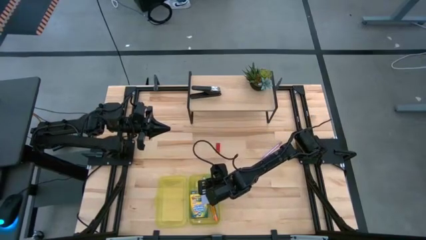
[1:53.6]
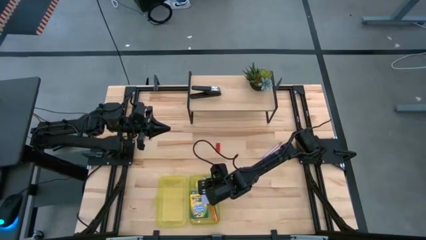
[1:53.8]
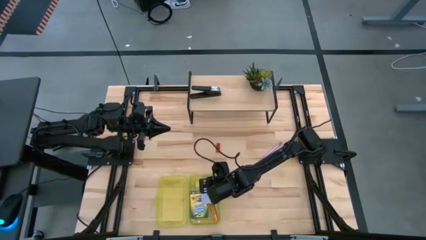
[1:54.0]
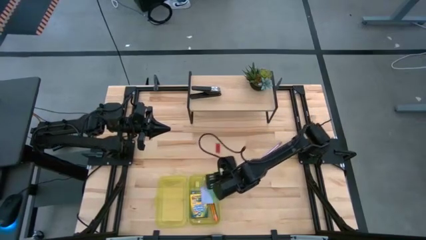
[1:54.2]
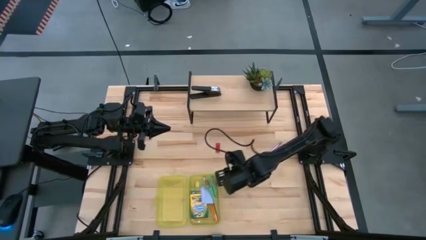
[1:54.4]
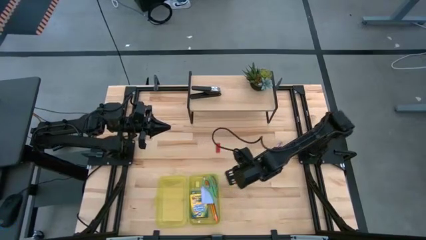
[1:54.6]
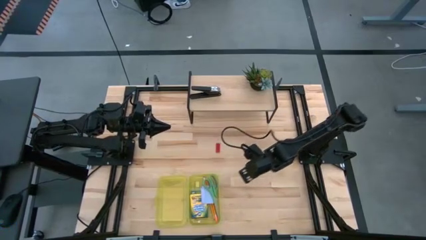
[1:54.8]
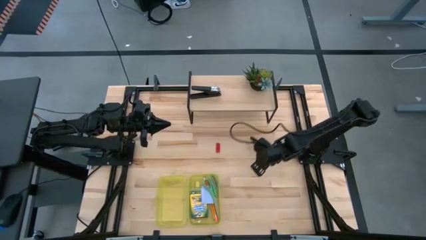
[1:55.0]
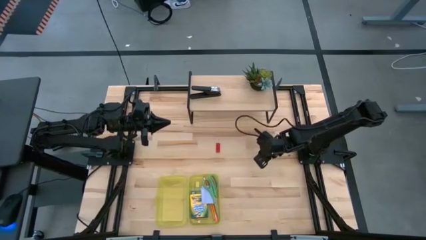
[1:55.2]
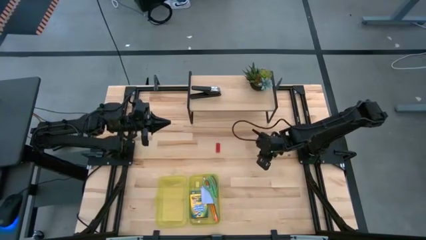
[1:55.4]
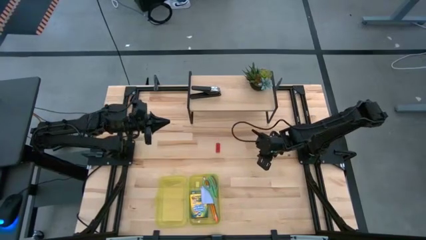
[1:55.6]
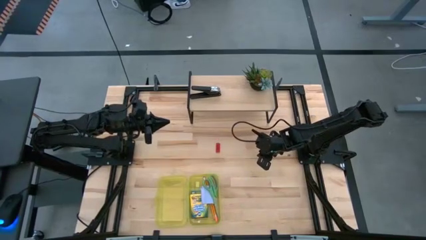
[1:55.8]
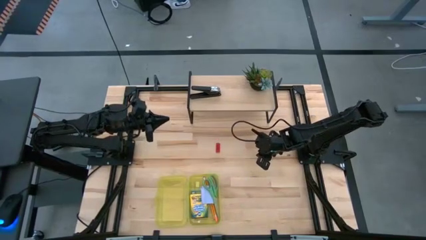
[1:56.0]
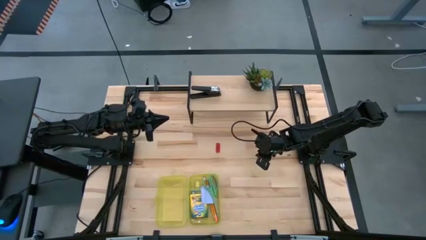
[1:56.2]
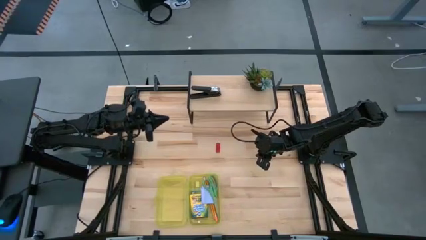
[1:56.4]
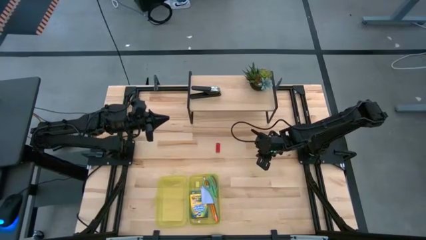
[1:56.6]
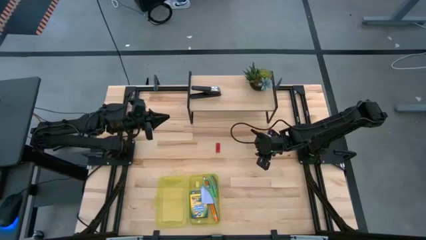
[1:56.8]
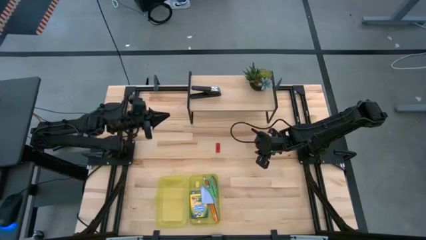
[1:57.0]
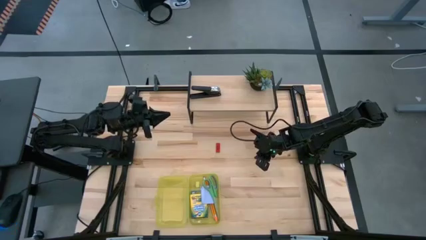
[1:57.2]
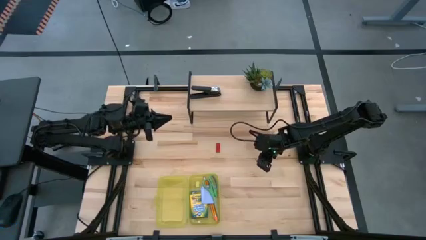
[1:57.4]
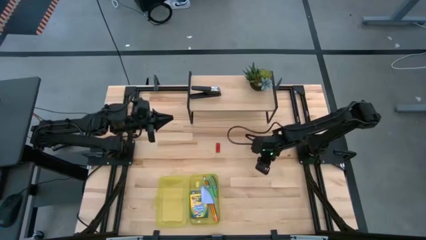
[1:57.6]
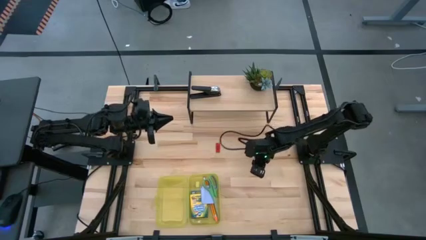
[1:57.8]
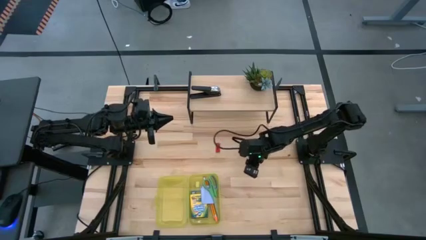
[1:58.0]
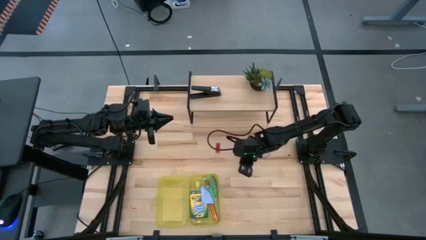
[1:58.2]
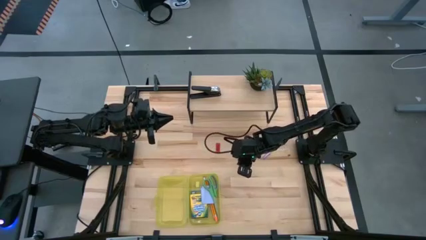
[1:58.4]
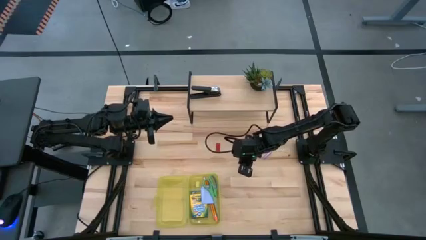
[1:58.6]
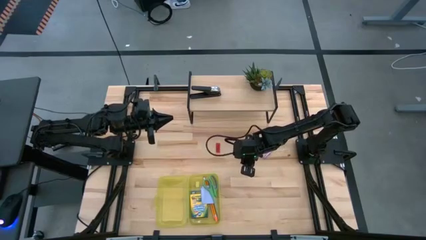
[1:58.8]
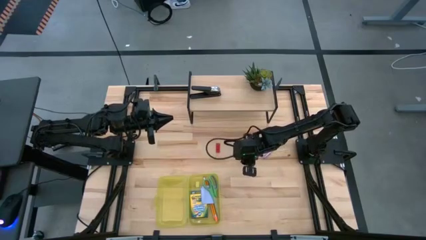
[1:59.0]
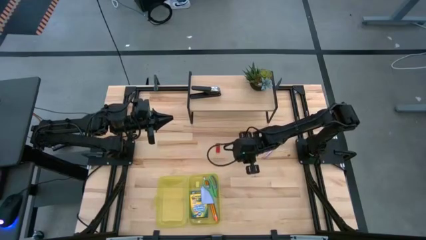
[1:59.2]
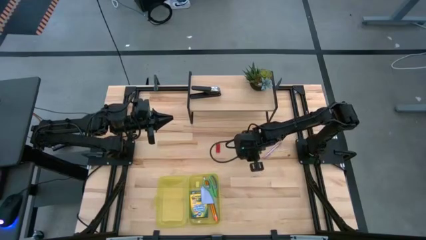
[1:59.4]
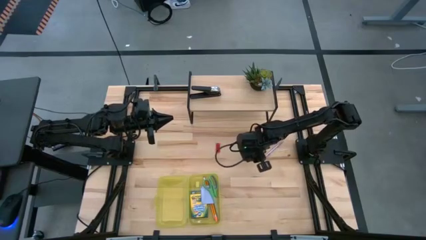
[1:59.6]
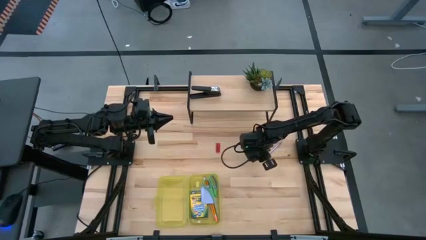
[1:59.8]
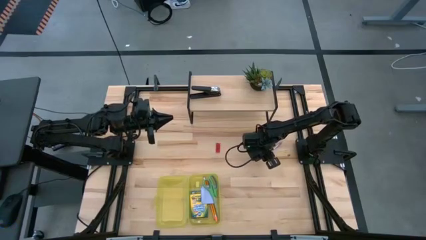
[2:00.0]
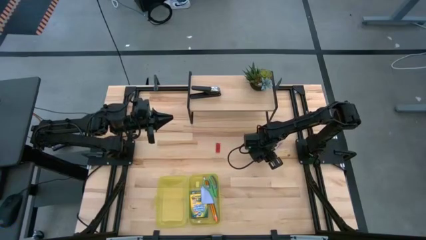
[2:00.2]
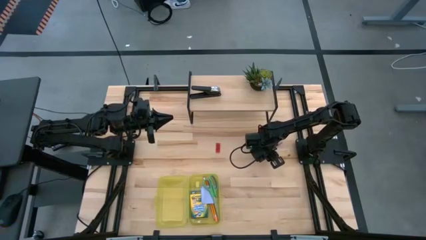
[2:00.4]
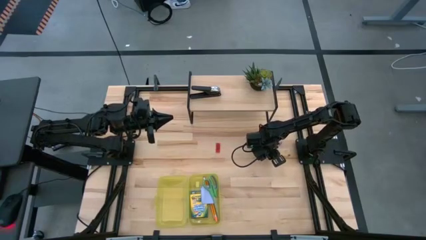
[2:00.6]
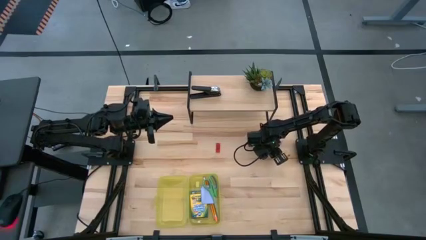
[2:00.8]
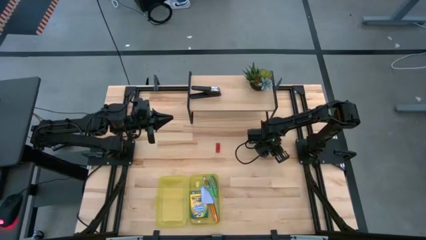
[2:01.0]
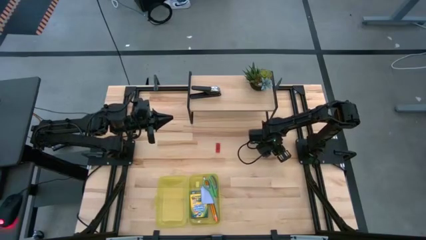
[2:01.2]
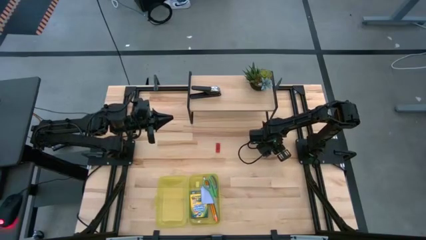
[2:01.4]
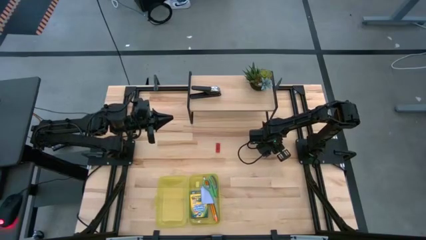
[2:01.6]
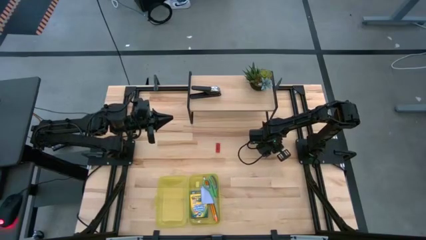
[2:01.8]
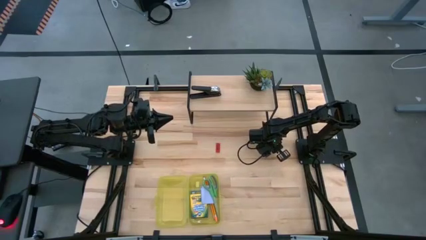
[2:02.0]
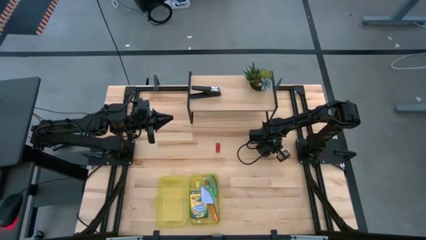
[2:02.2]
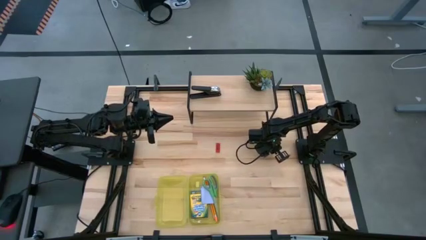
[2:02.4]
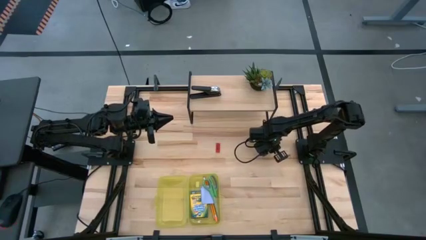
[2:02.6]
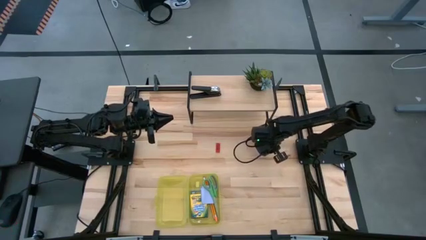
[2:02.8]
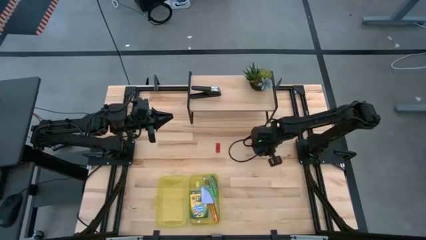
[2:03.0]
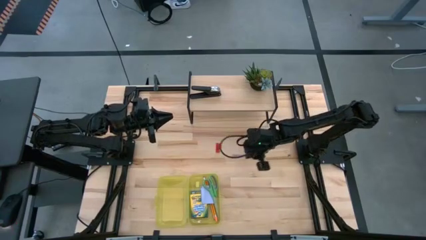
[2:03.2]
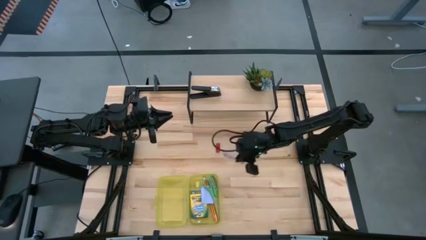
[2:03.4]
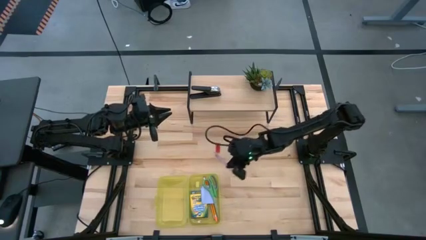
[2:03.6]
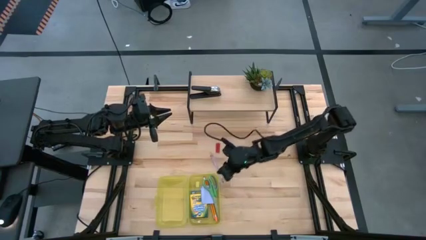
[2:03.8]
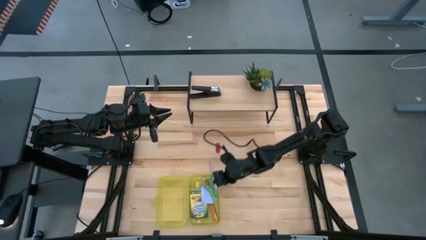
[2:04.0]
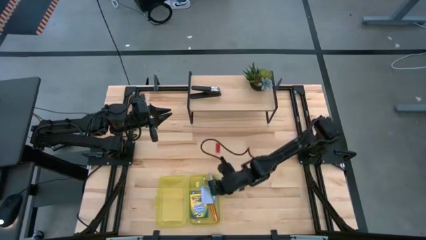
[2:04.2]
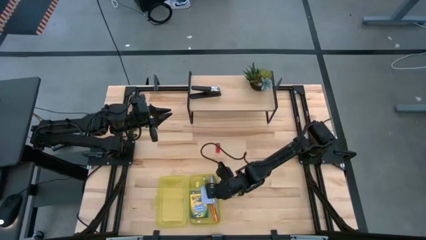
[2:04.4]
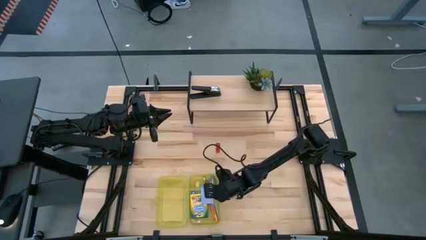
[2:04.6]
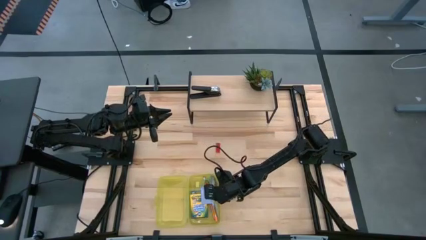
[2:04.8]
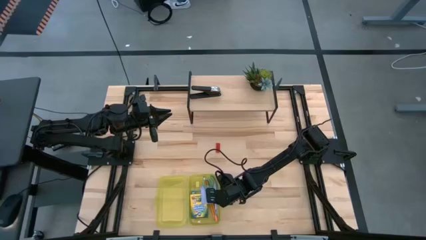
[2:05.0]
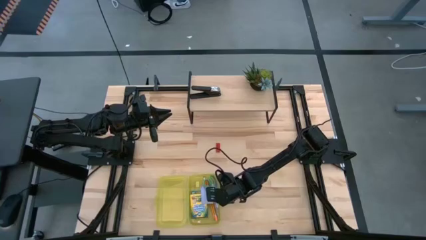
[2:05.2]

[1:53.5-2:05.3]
Task: Pack school essentials
Put the purple pen into the yellow supply box

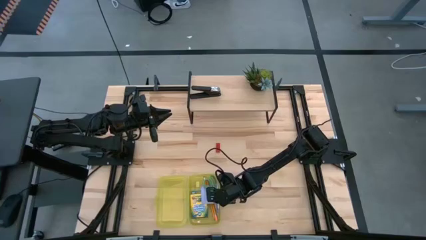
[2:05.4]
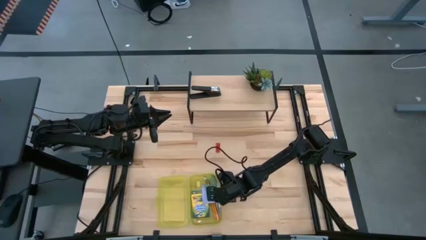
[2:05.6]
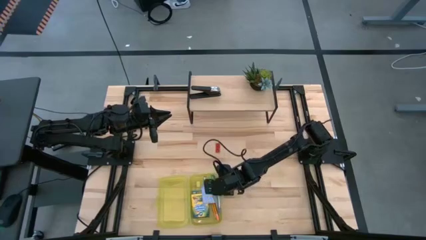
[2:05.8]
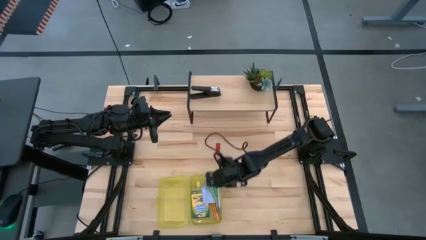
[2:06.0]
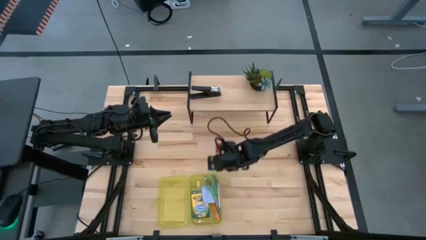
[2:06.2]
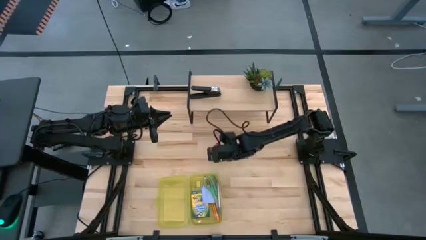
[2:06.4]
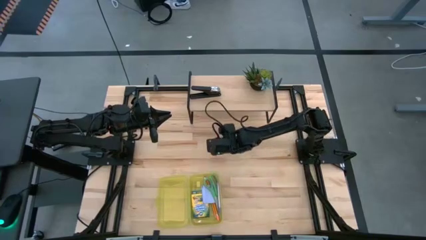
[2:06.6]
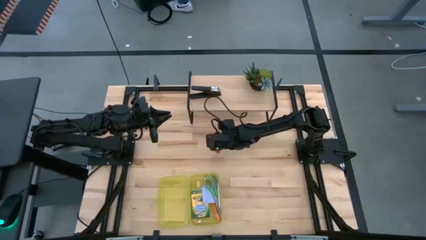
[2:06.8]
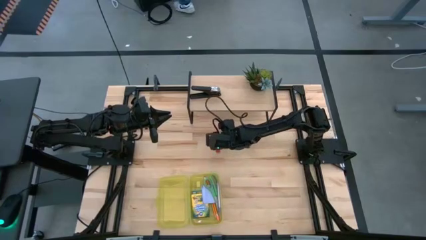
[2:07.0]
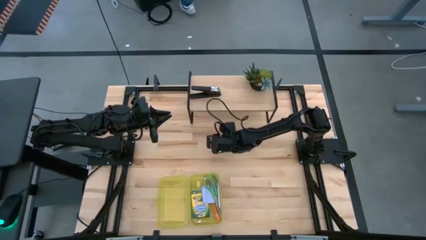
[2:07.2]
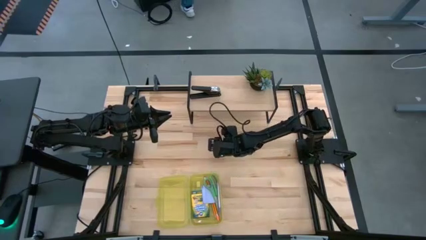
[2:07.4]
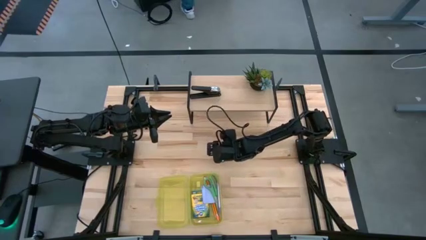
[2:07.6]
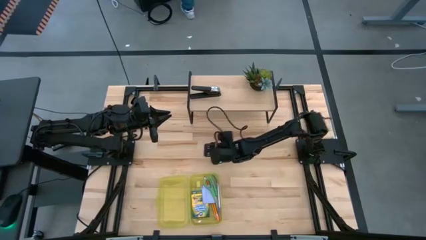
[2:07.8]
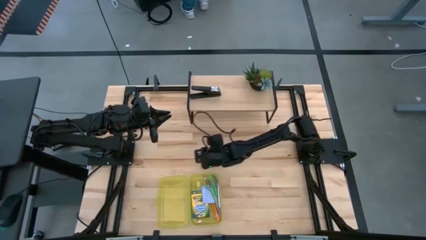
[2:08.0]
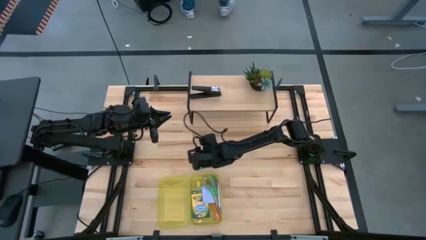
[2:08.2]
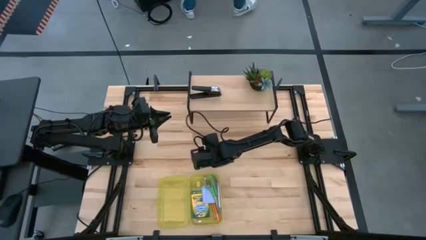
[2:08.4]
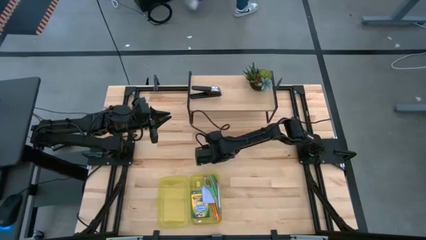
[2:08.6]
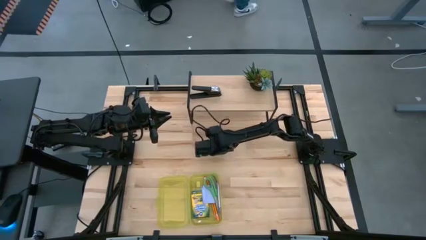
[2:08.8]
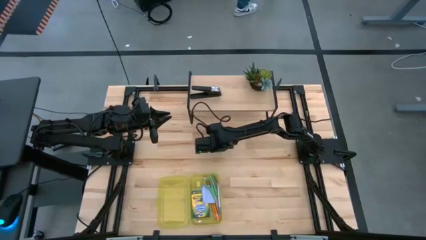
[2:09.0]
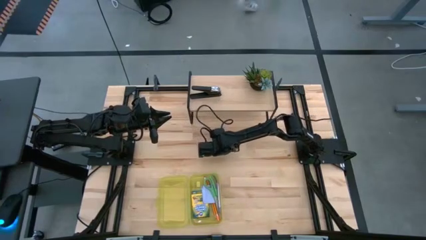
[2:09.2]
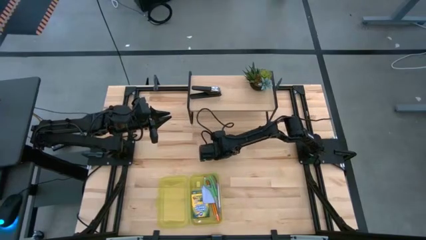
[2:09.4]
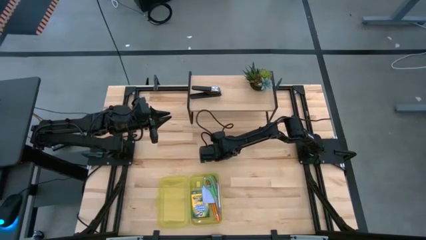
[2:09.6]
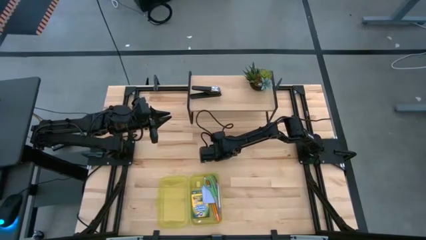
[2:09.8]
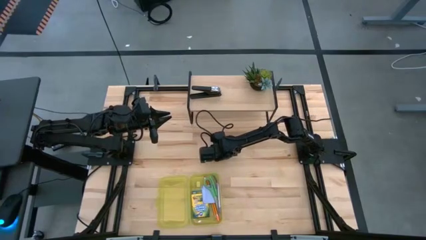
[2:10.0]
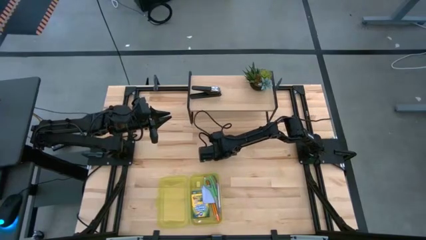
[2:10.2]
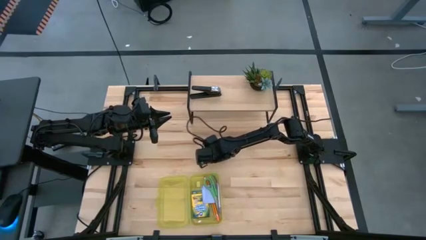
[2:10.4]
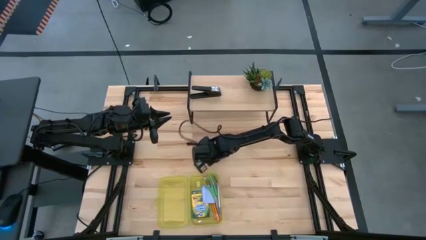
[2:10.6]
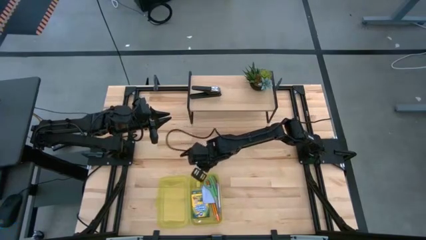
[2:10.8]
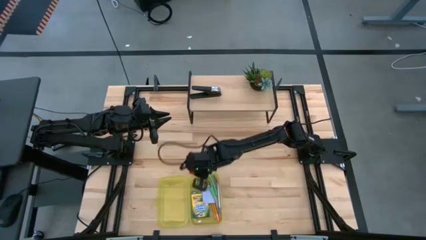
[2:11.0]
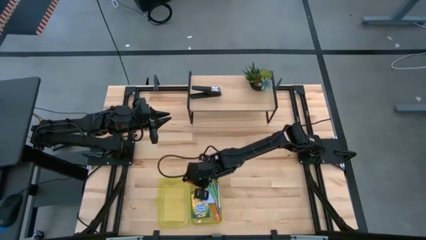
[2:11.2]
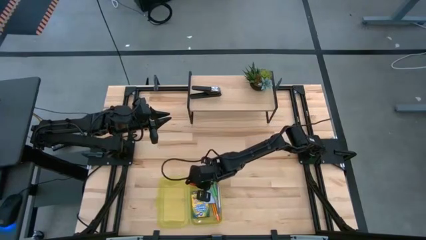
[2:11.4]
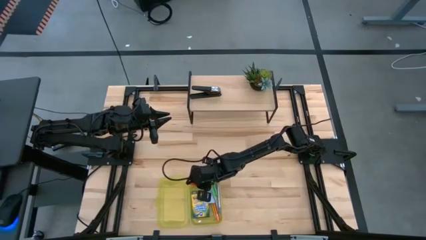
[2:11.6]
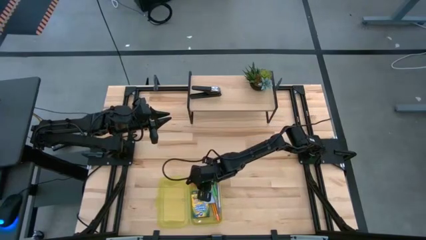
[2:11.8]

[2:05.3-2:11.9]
Put the red eraser into the yellow supply box
